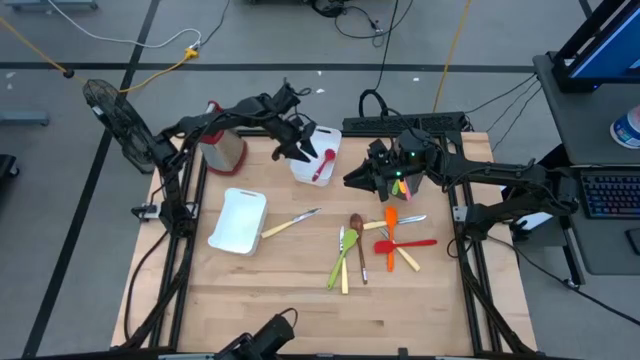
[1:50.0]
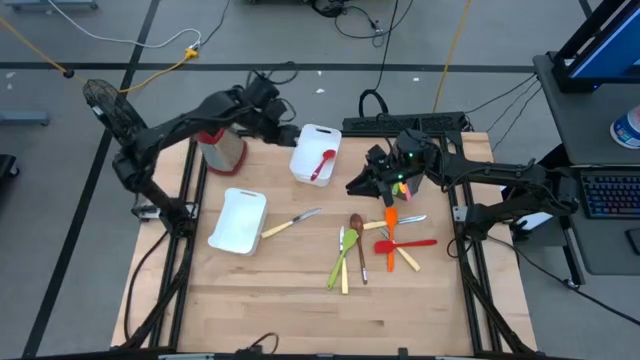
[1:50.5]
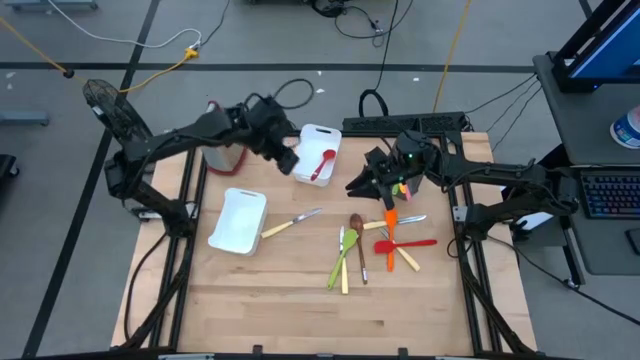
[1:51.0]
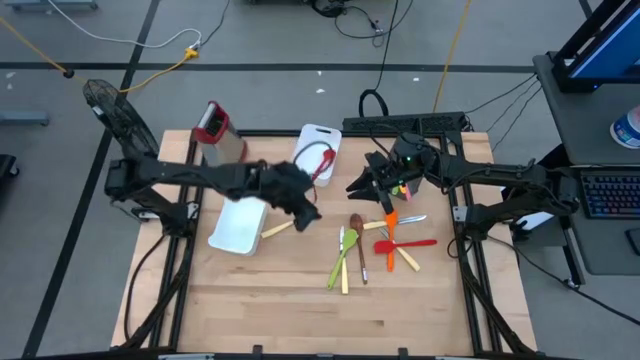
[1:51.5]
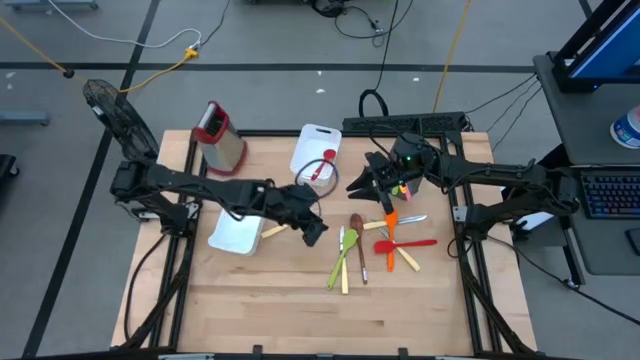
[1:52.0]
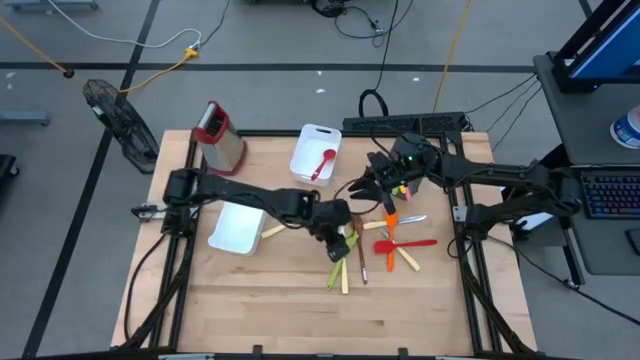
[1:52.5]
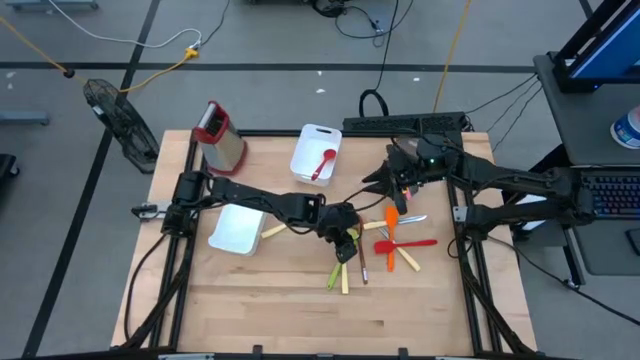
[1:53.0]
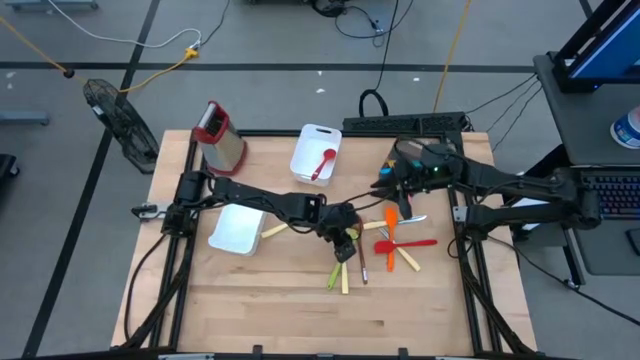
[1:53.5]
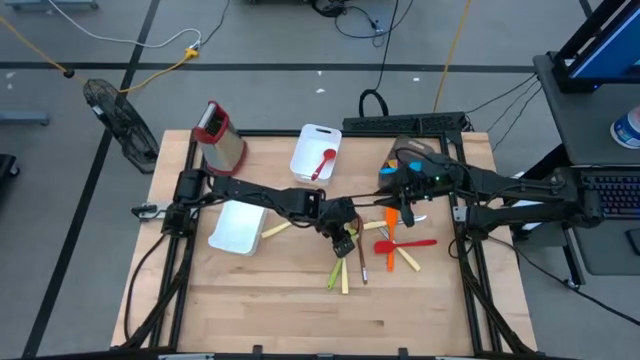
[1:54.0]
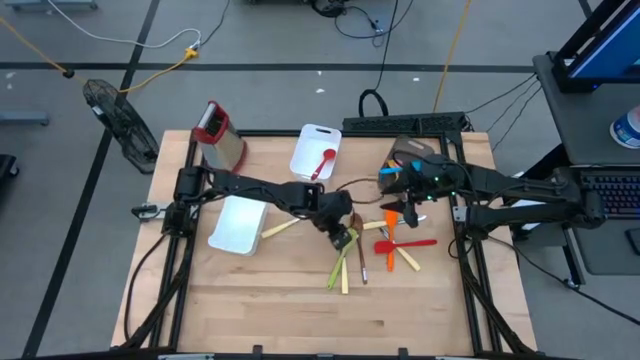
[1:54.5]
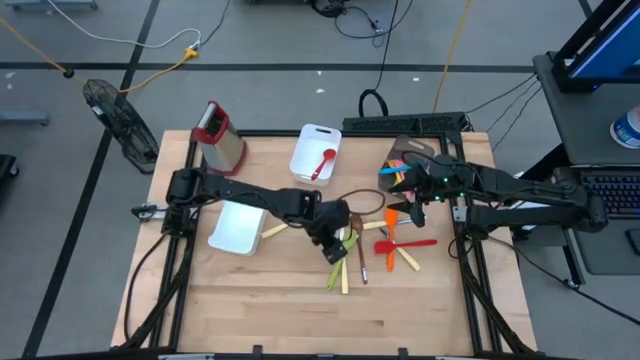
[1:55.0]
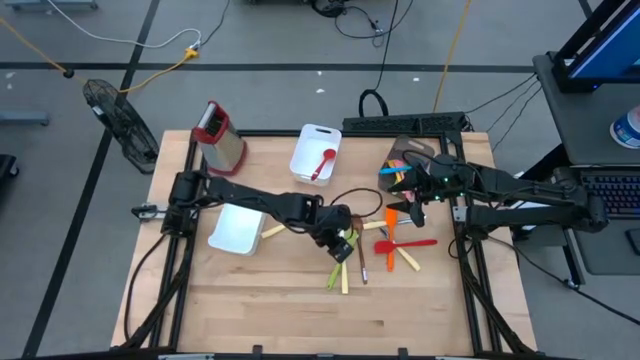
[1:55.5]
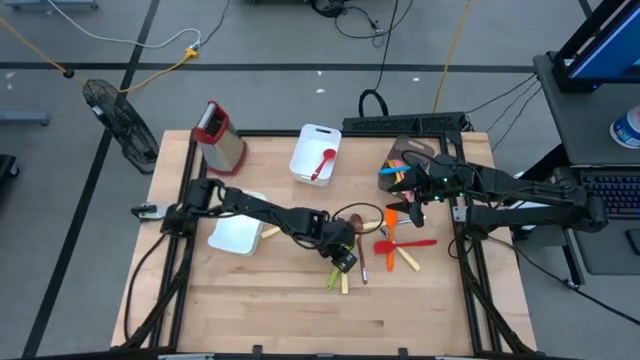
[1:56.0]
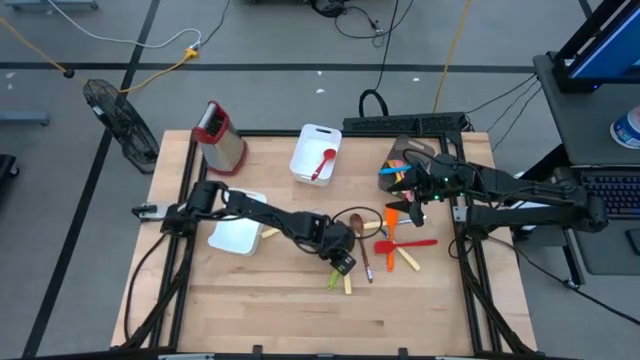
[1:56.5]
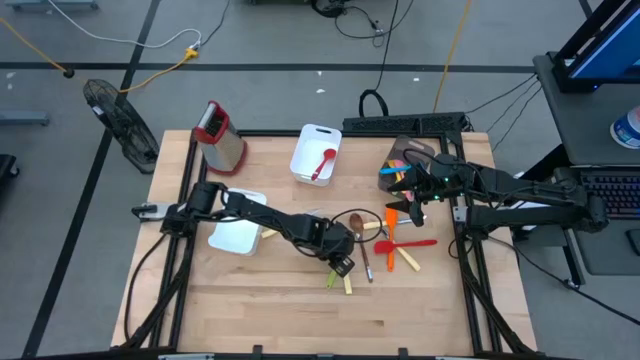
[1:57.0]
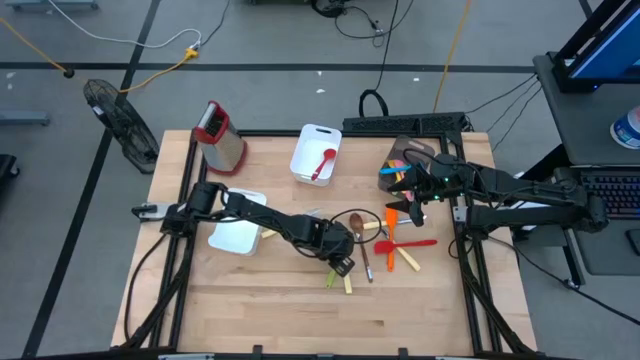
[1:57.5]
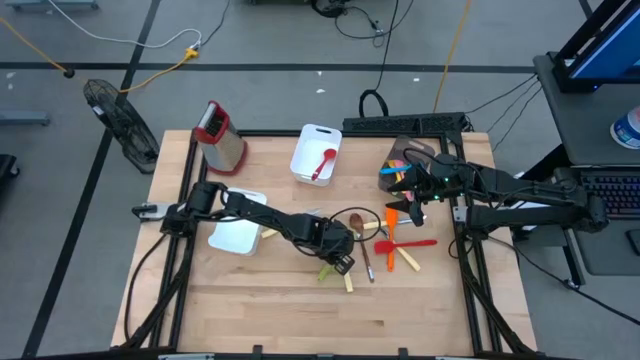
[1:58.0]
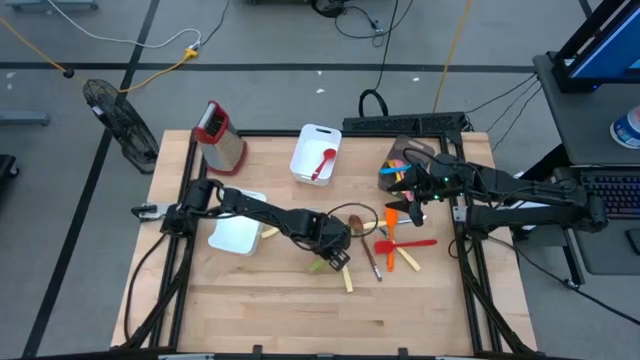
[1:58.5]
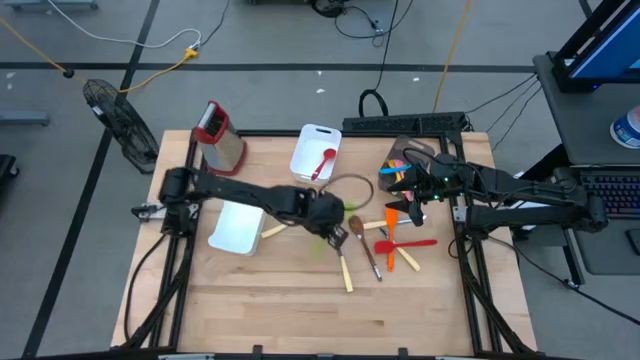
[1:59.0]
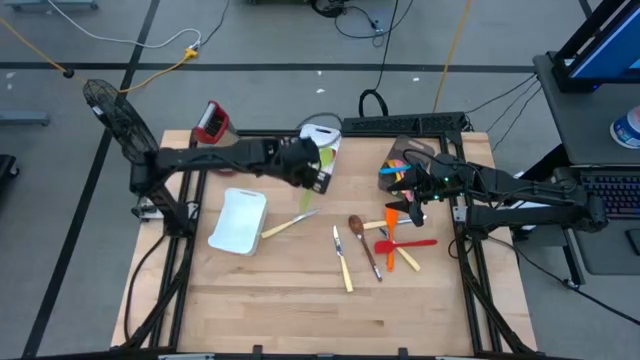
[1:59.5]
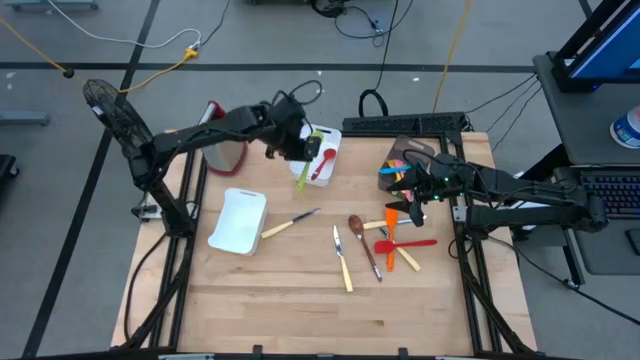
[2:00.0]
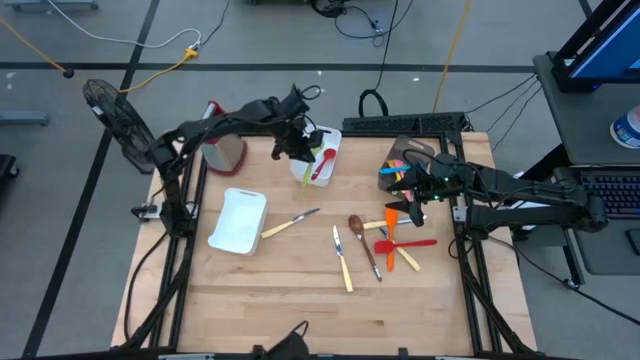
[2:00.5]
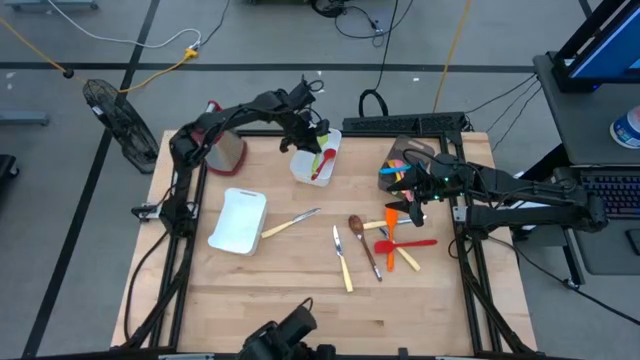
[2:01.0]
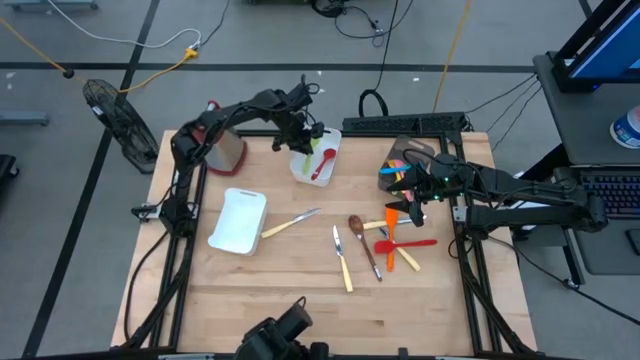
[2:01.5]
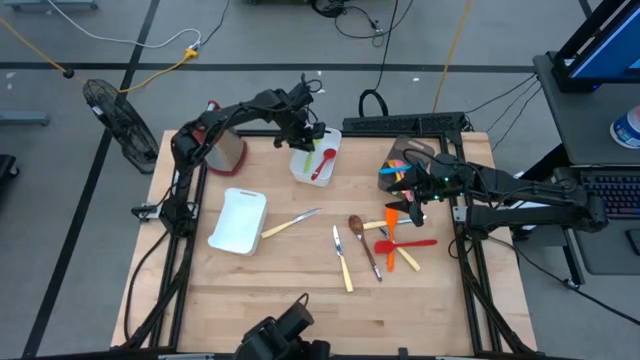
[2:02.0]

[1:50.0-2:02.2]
Task: Pick & Place Kitchen Items
Put the green serving spoon into the top white bin

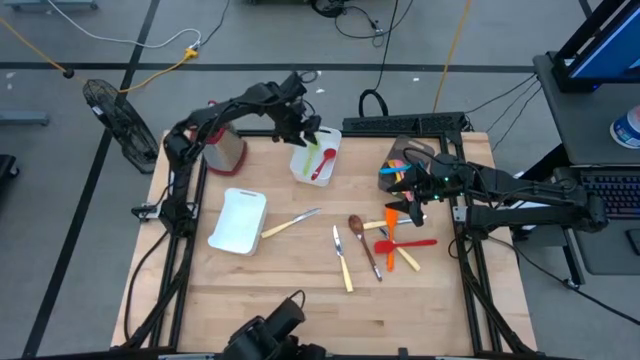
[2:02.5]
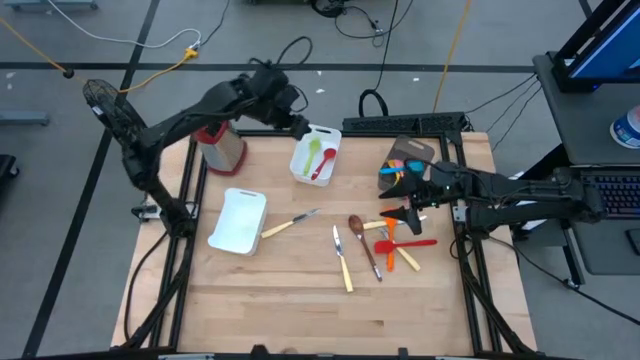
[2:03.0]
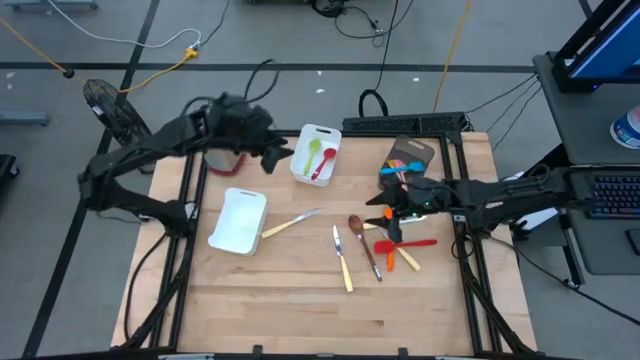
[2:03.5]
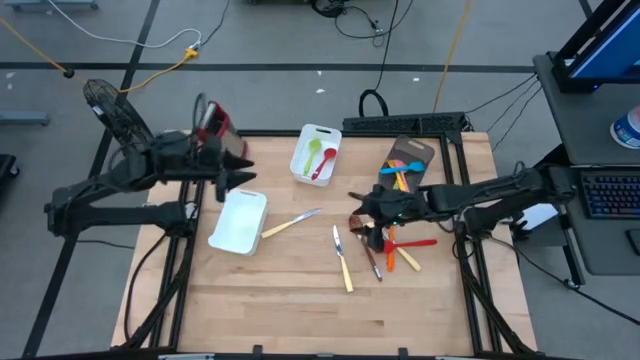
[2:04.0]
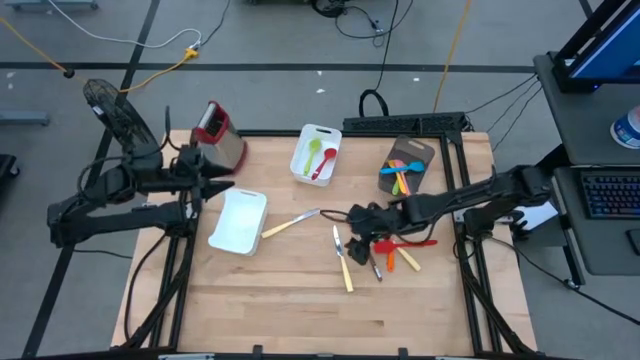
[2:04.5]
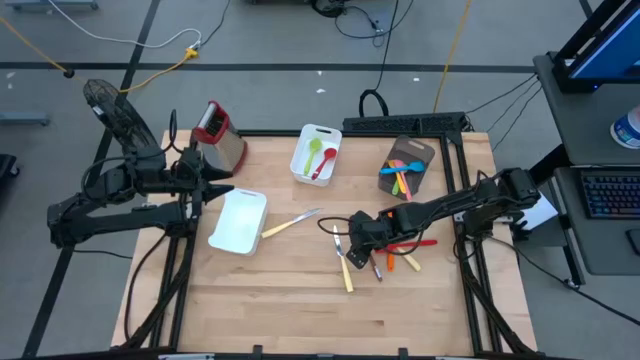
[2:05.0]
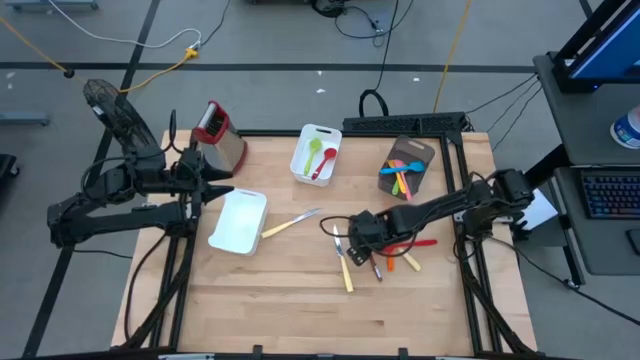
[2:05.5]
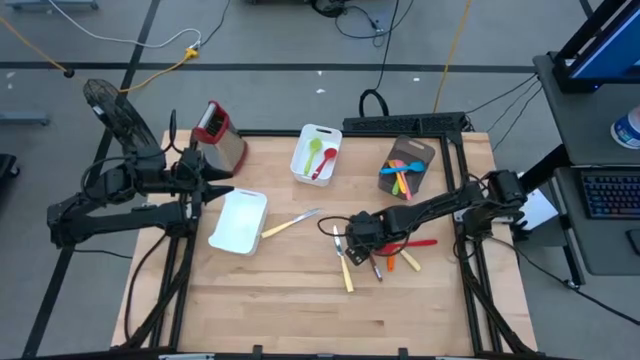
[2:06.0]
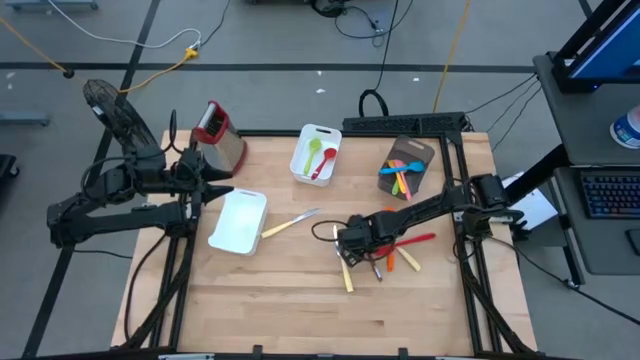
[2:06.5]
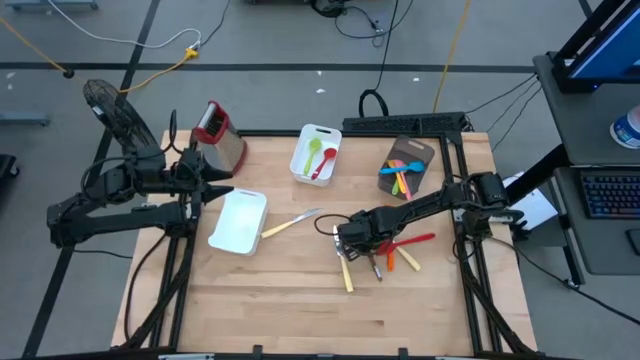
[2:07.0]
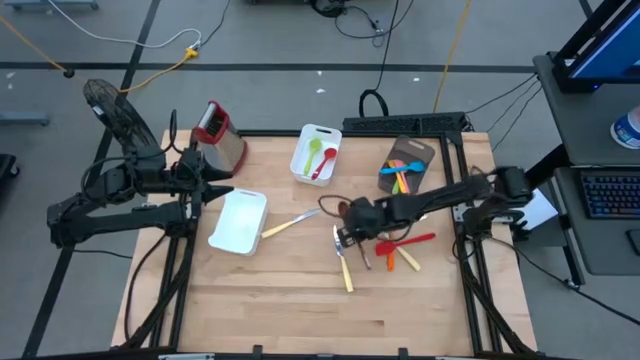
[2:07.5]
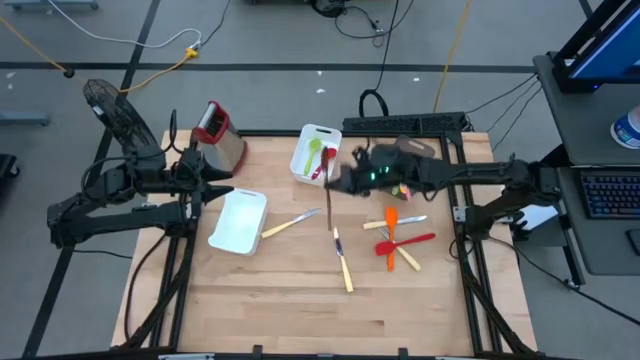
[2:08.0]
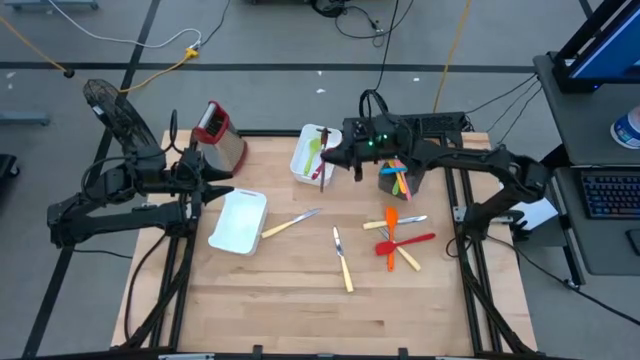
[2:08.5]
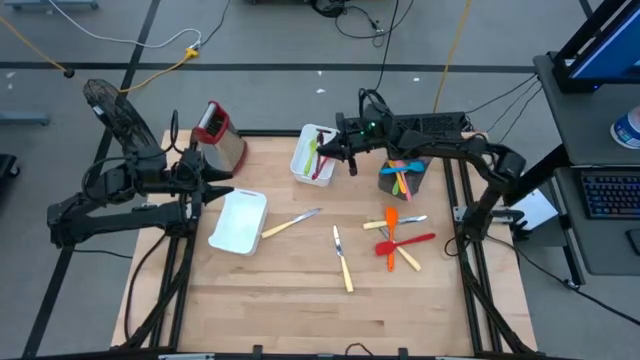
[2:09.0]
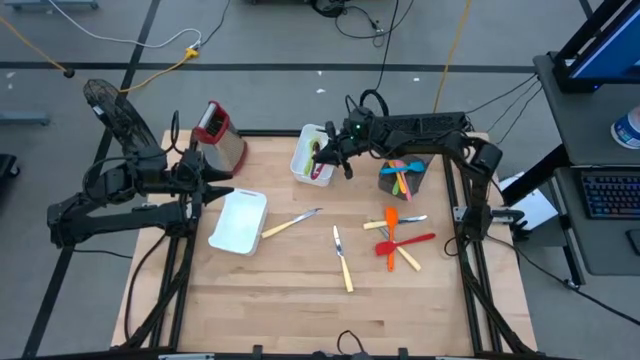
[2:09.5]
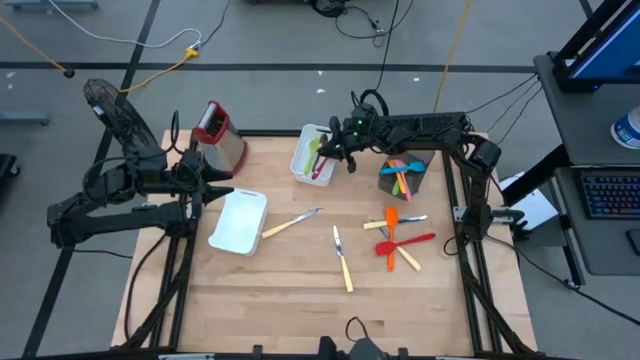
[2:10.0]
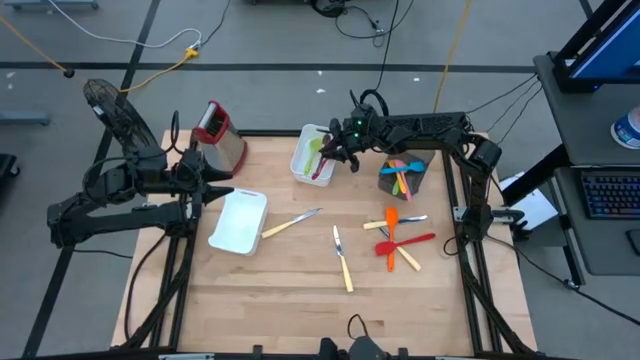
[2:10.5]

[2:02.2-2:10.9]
Put the brown serving spoon into the top white bin

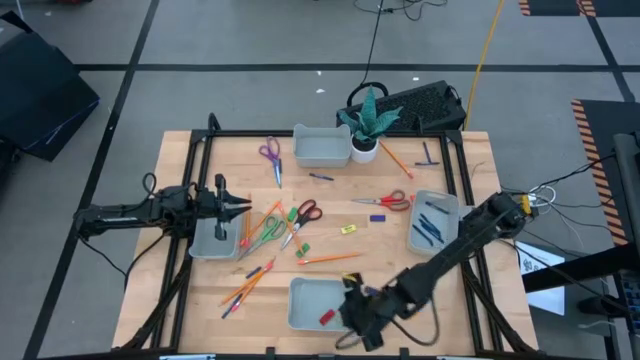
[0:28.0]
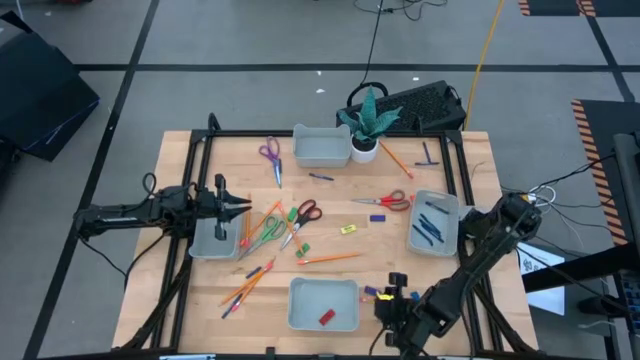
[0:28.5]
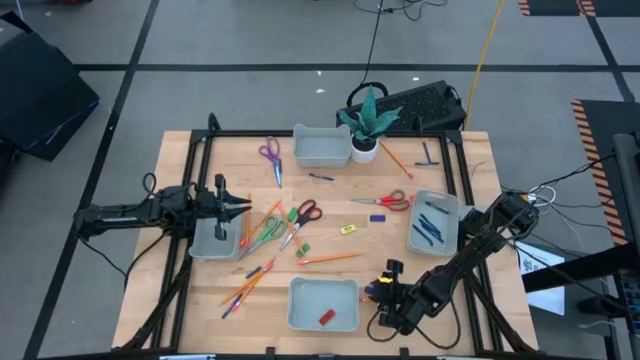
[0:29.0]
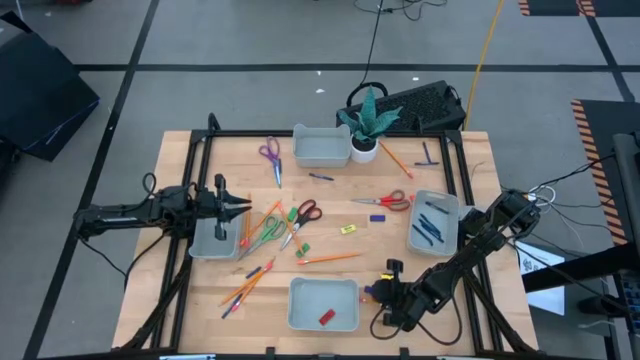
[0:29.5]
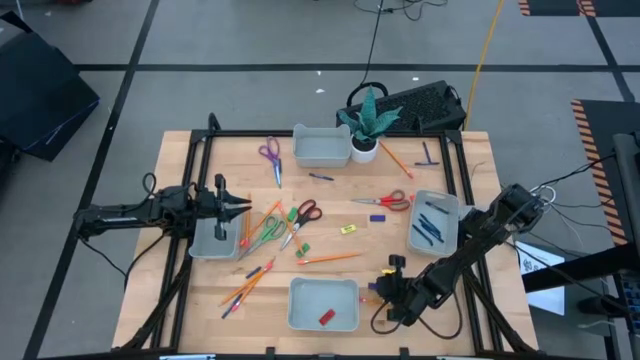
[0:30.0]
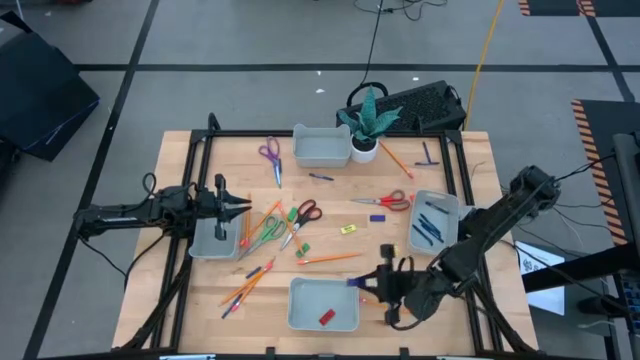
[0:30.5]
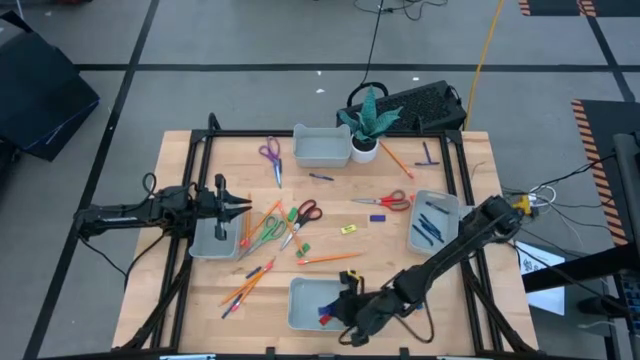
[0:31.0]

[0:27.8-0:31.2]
Task: Sort crayons/erasers/pens/pencils in bins
Put the dark blue eraser into the bottom gray bin
